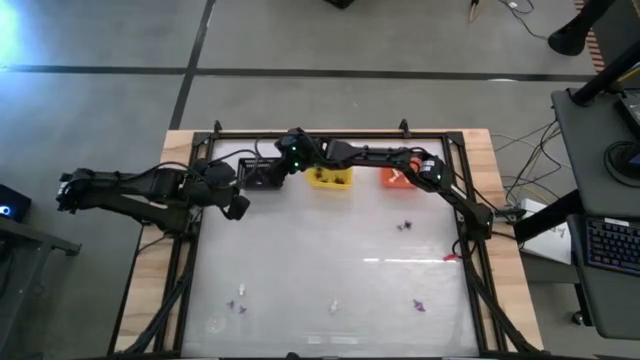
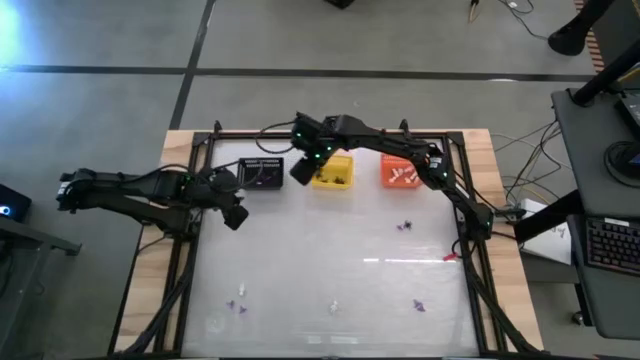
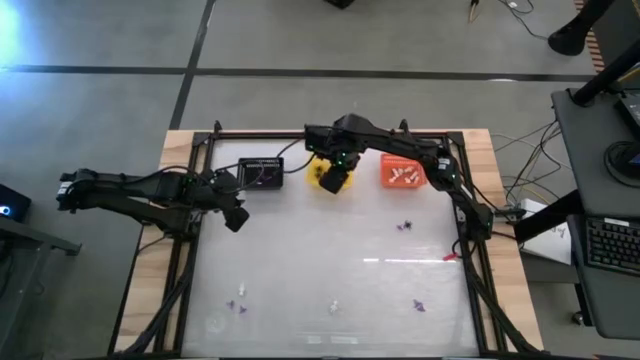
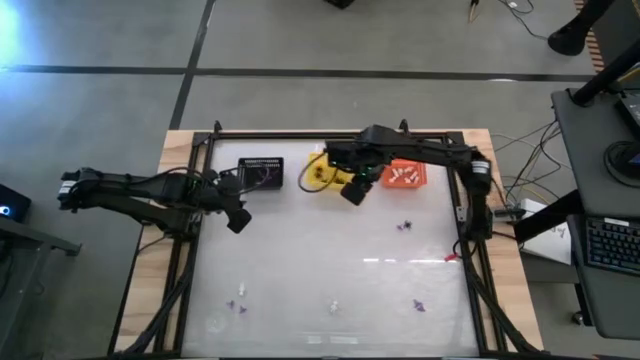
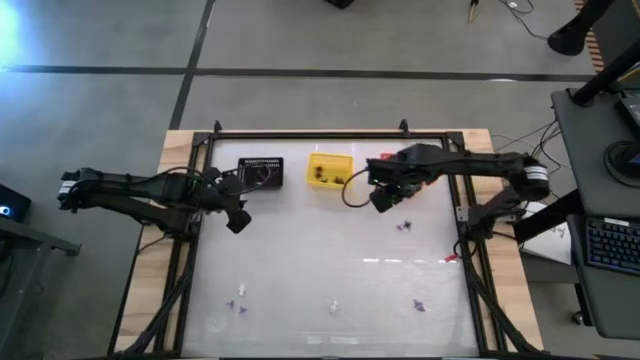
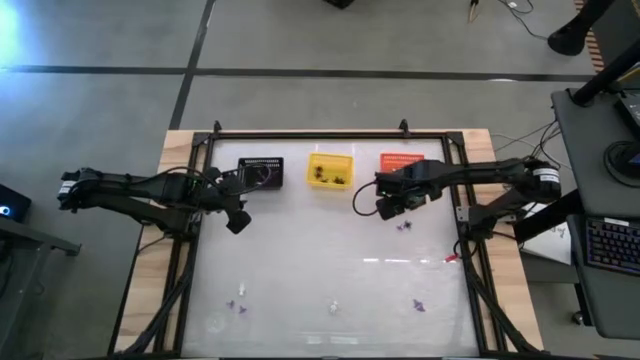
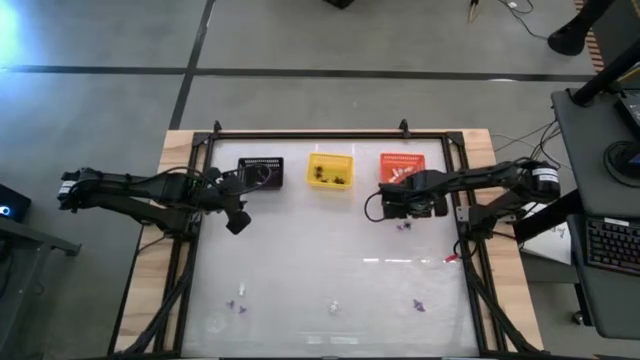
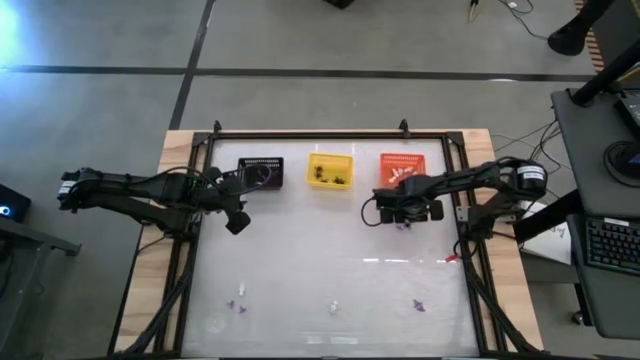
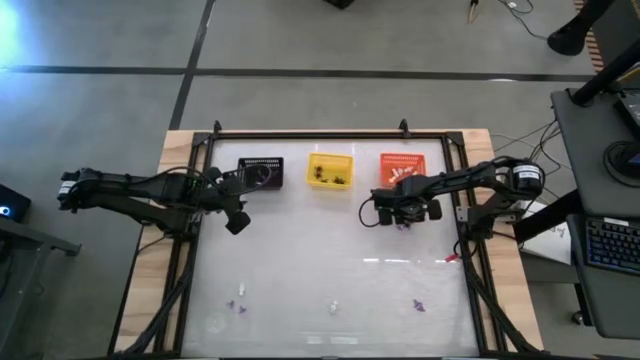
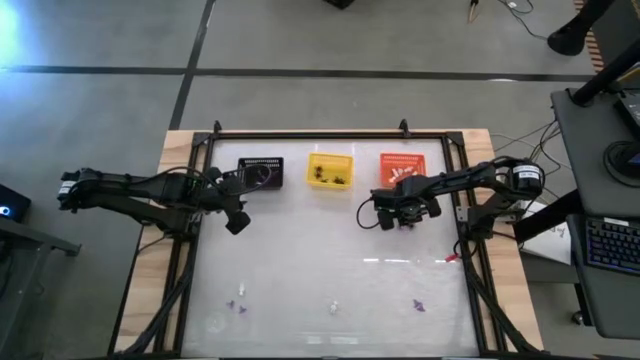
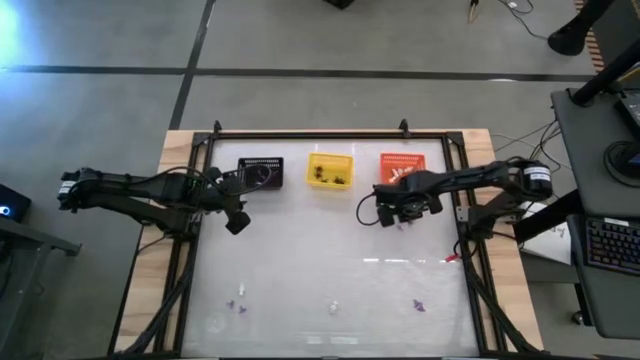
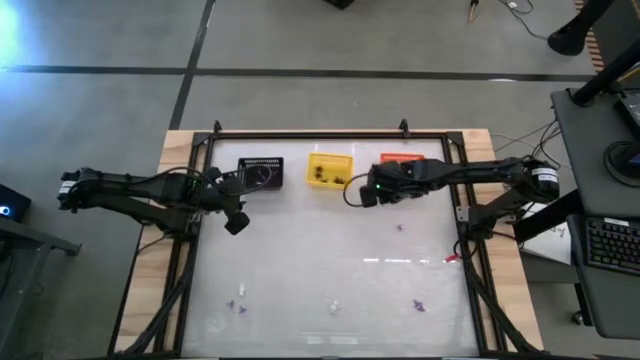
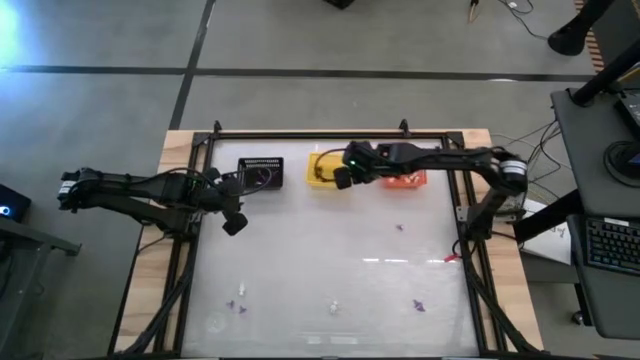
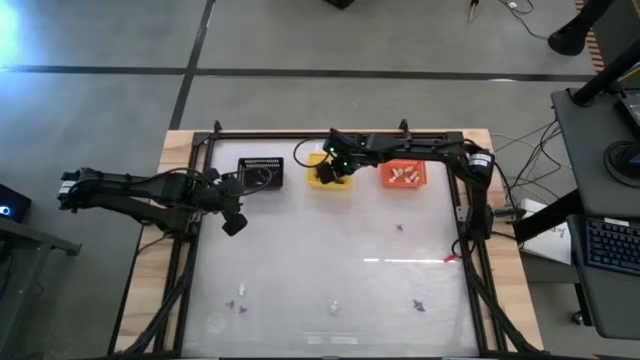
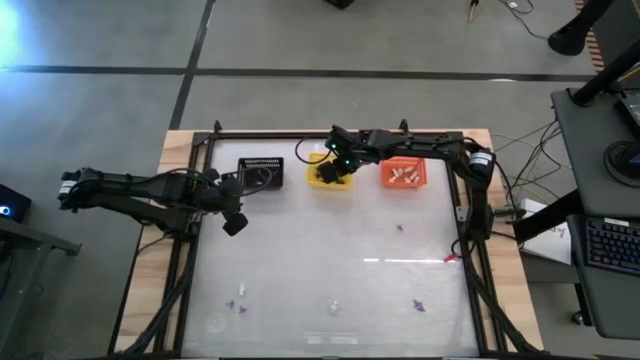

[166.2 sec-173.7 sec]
Task: Sort Halloween decoration
Put the black spider toy into the yellow bin

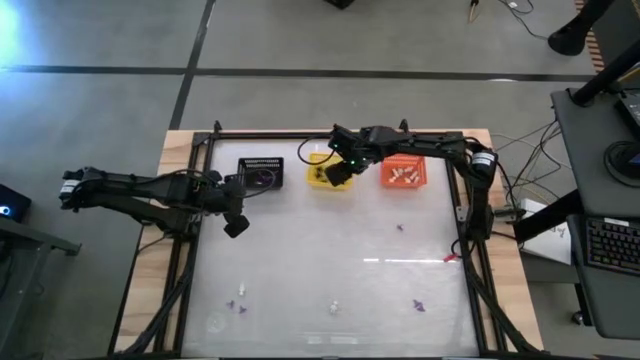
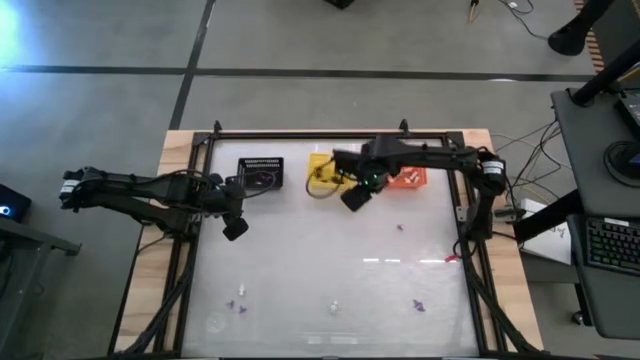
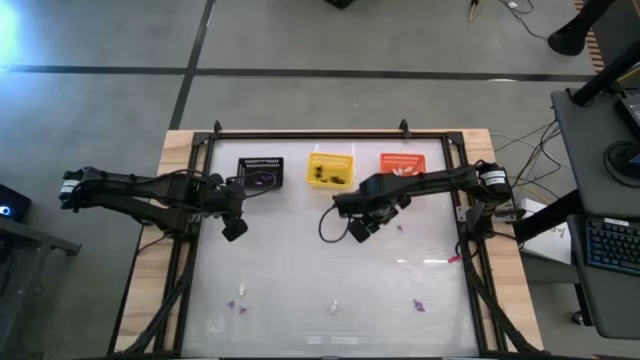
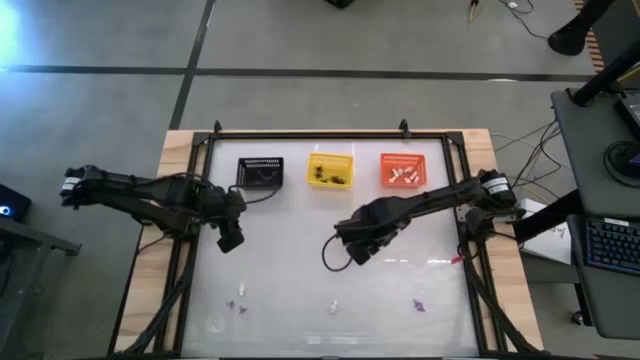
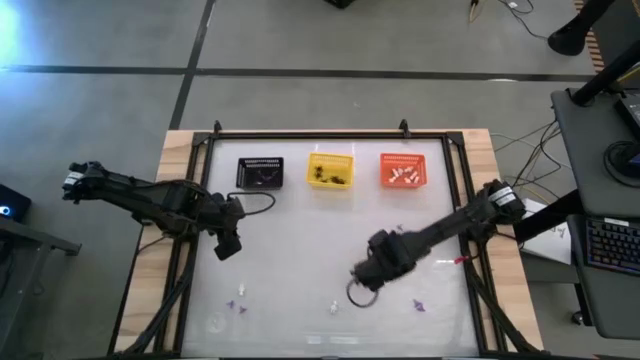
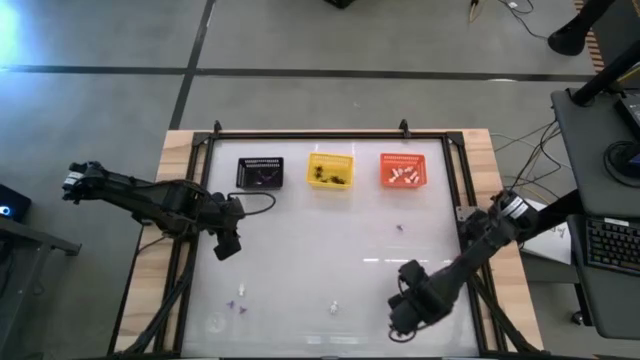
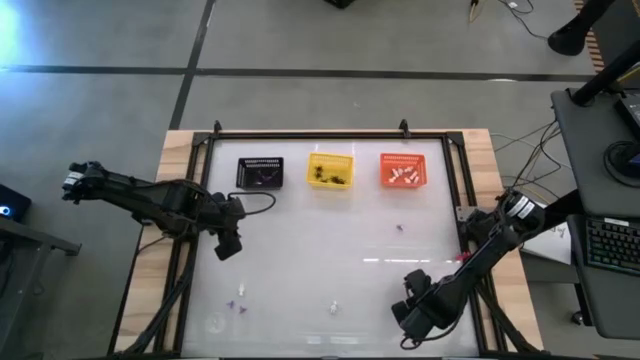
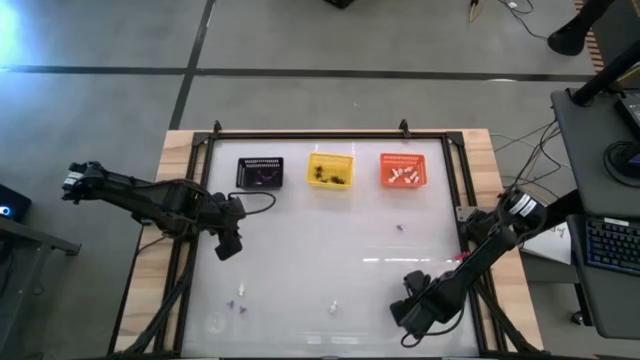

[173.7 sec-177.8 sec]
Put the violet hat toy into the black bin

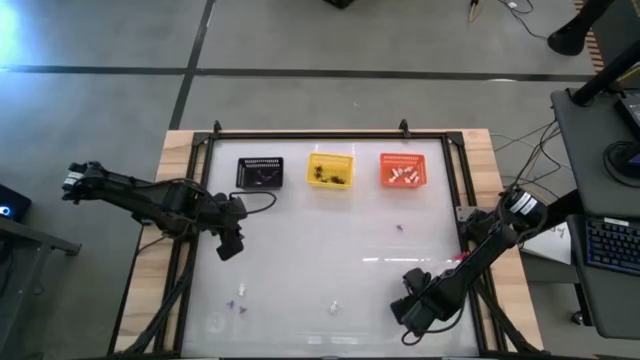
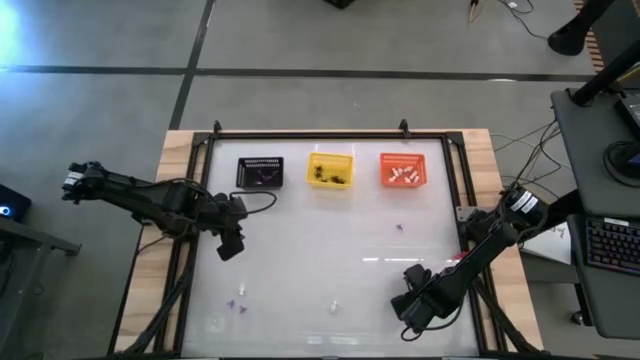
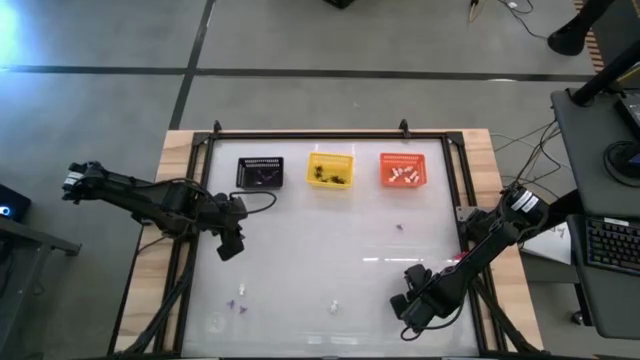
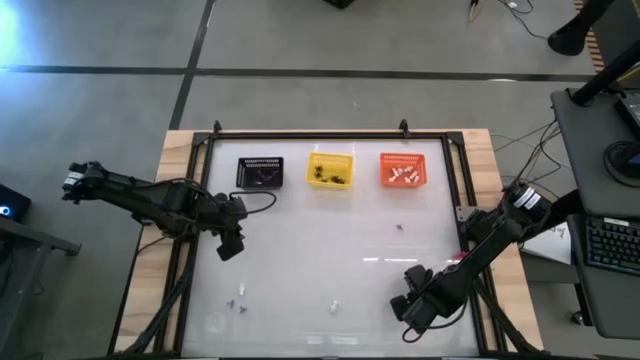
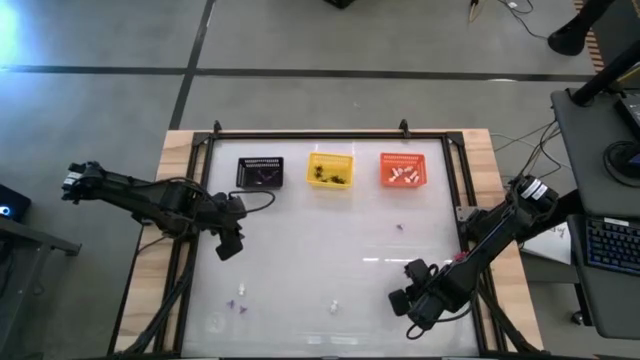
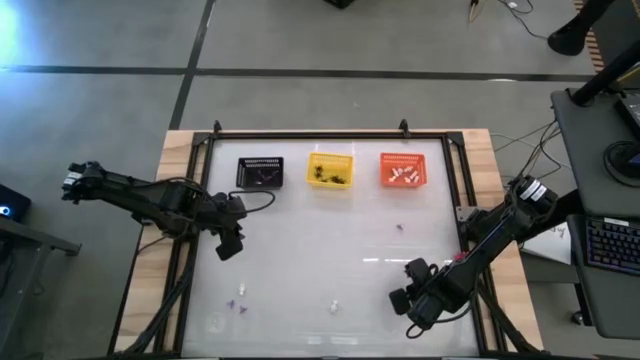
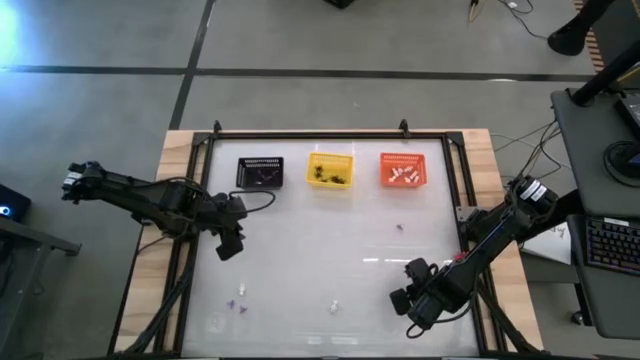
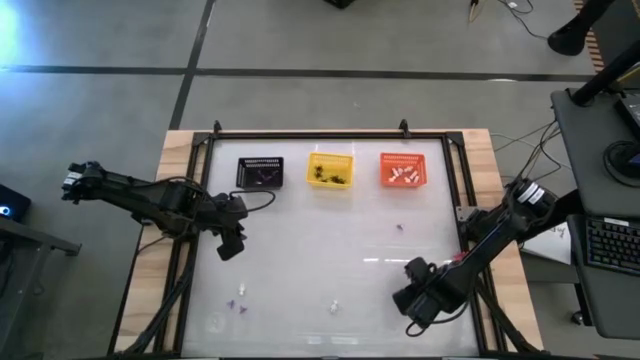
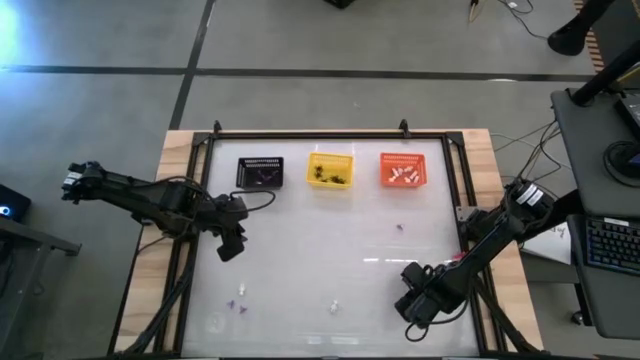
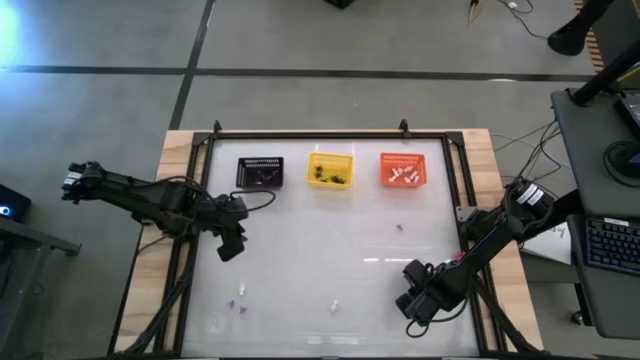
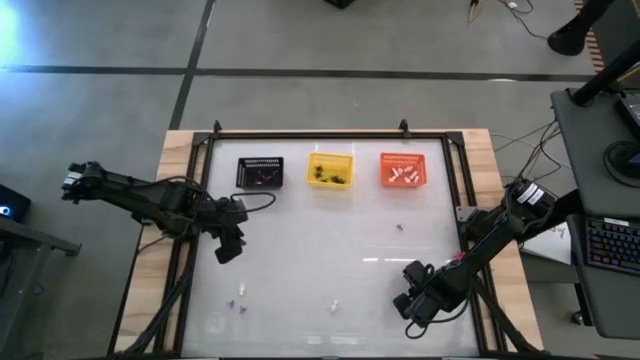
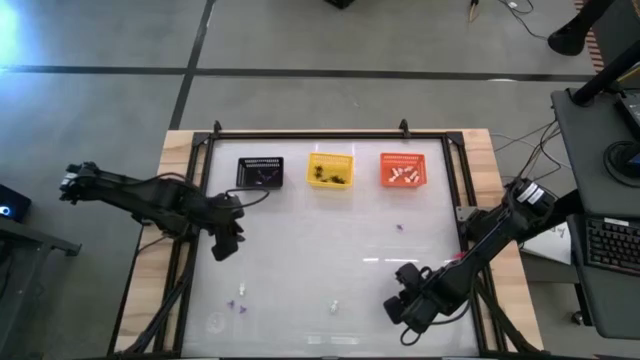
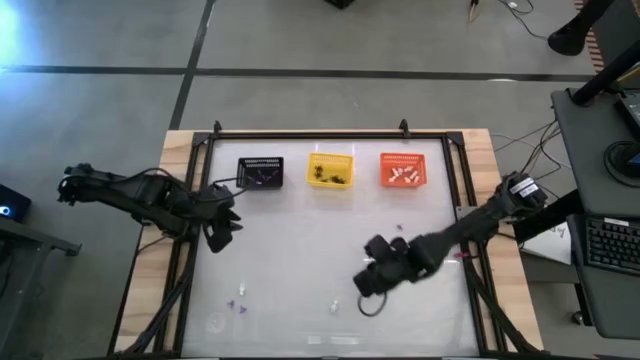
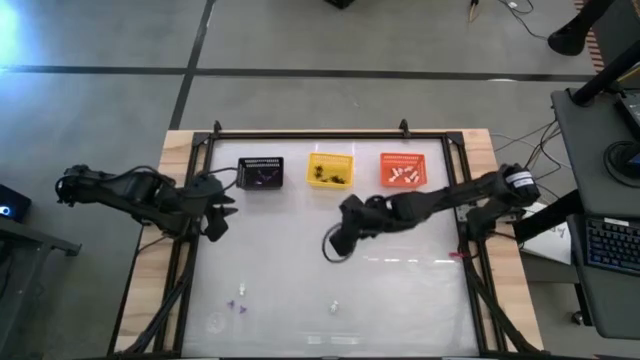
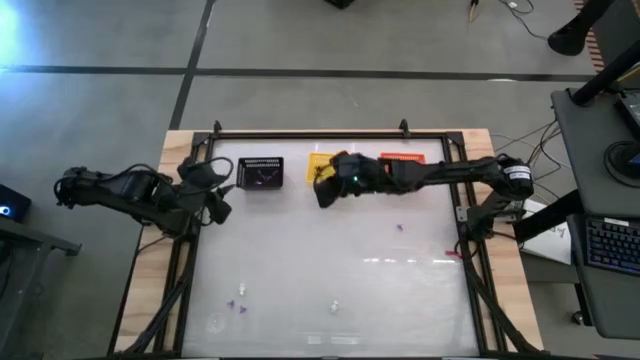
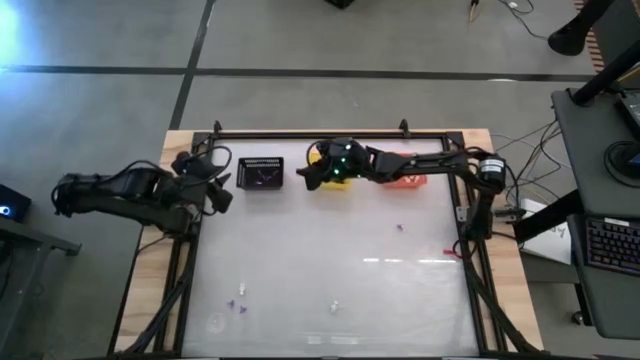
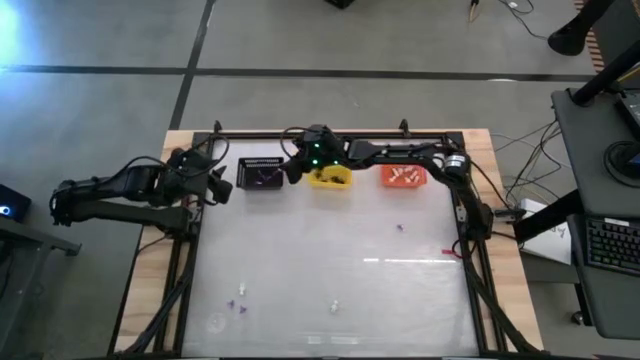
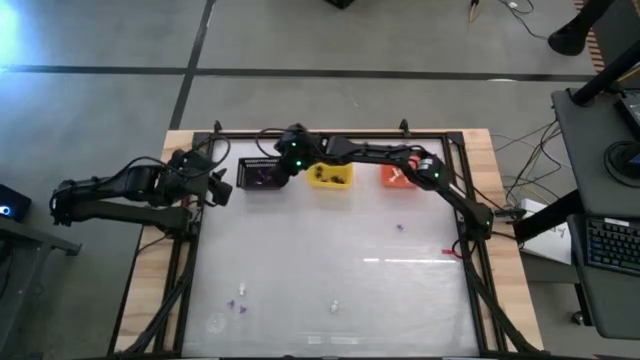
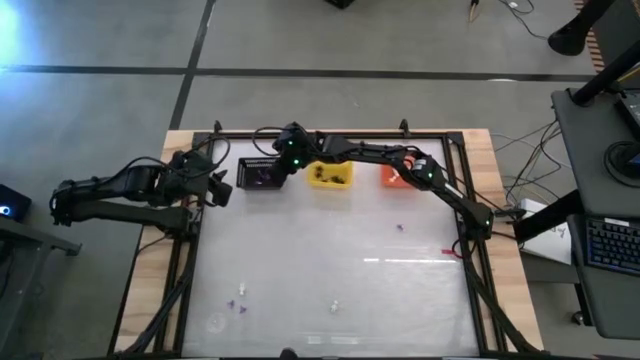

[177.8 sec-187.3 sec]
Put the violet hat toy into the black bin
